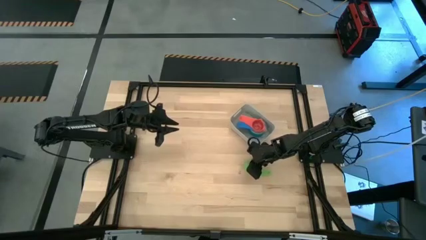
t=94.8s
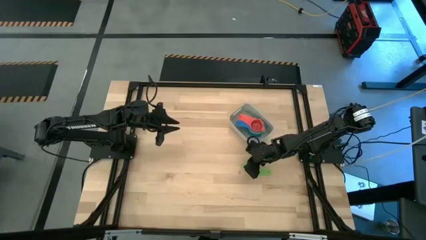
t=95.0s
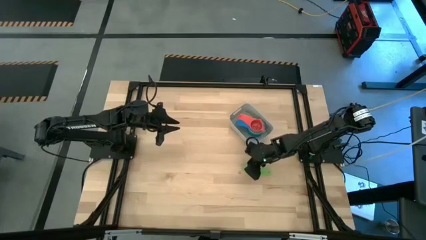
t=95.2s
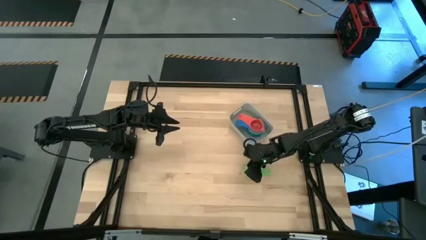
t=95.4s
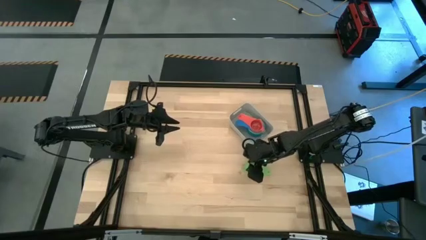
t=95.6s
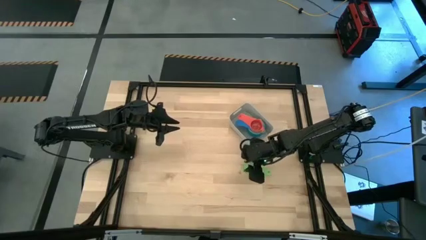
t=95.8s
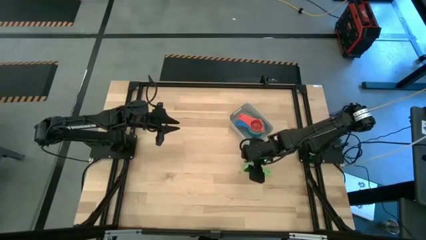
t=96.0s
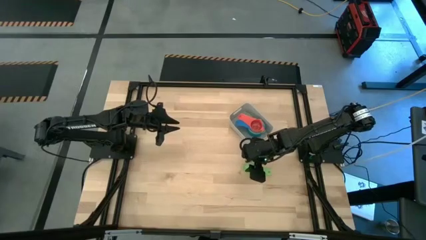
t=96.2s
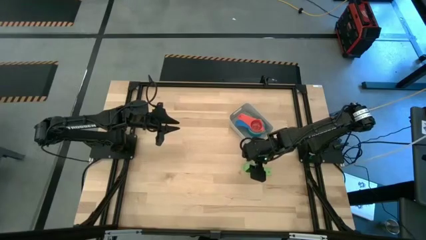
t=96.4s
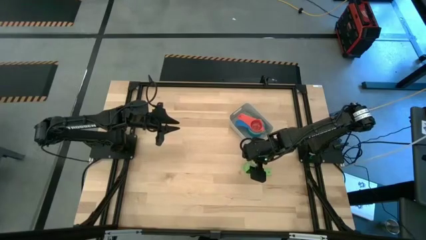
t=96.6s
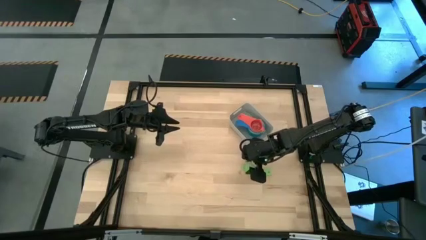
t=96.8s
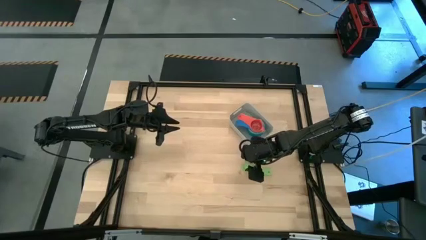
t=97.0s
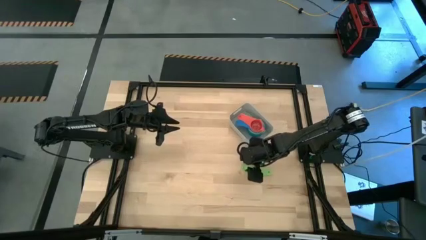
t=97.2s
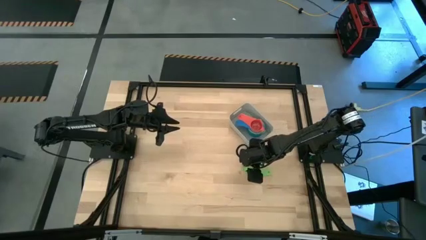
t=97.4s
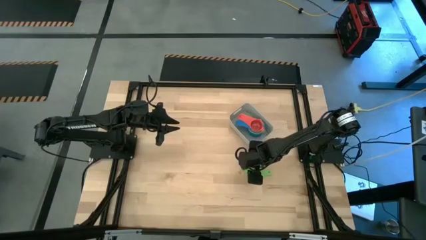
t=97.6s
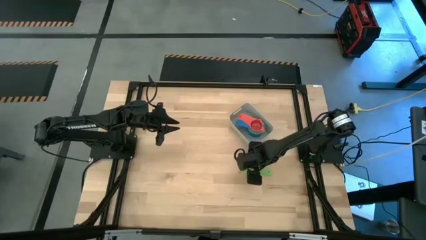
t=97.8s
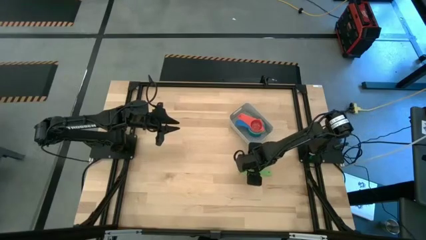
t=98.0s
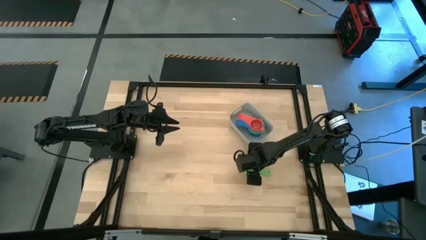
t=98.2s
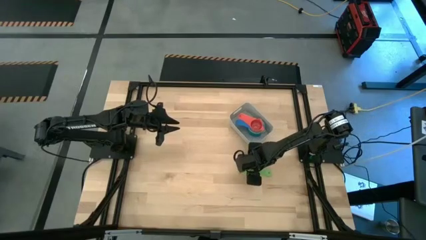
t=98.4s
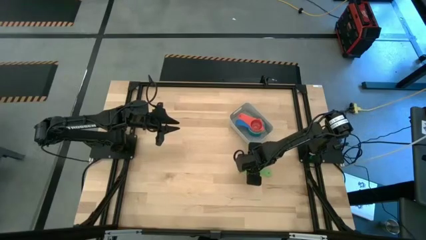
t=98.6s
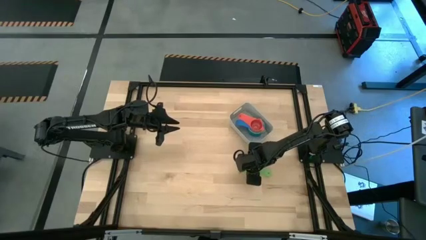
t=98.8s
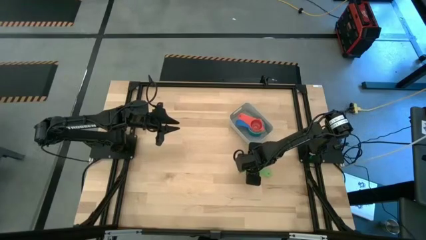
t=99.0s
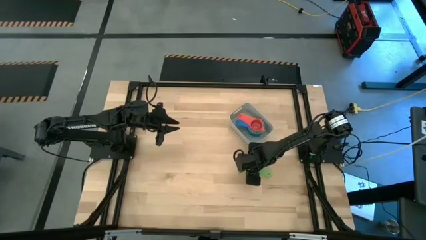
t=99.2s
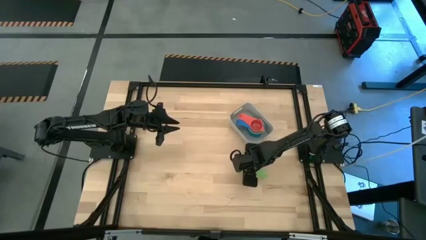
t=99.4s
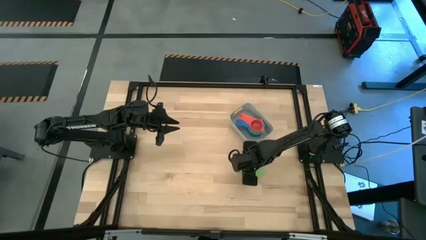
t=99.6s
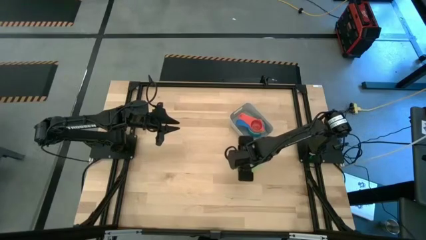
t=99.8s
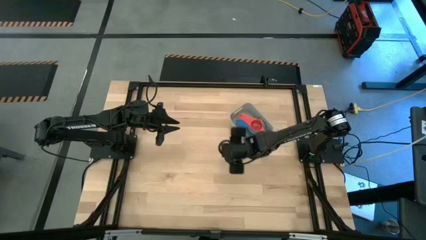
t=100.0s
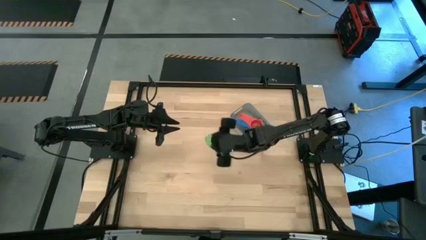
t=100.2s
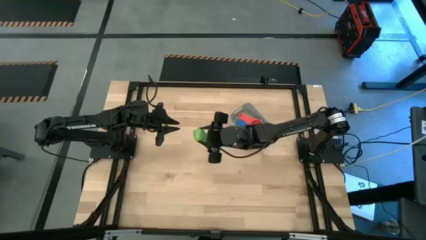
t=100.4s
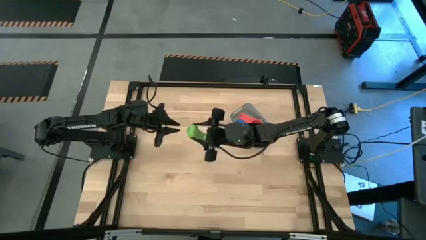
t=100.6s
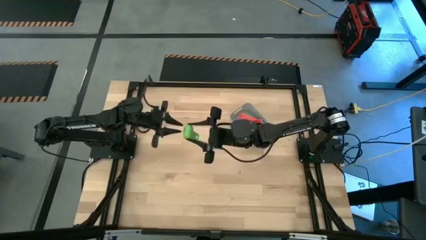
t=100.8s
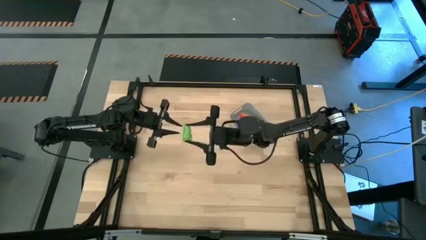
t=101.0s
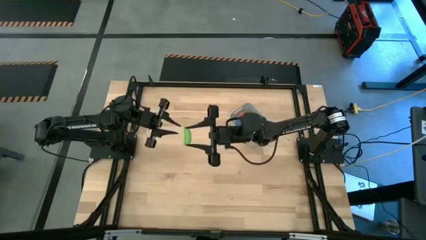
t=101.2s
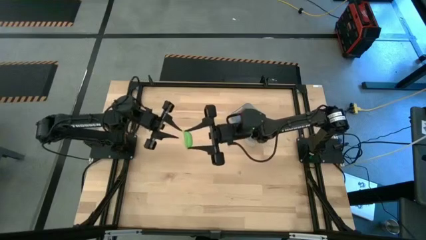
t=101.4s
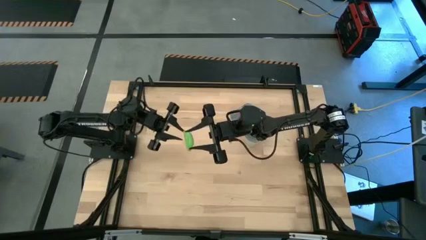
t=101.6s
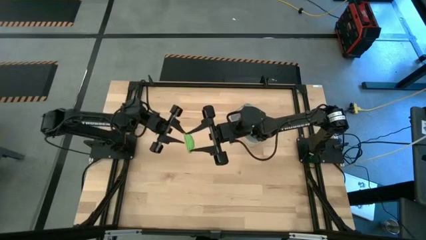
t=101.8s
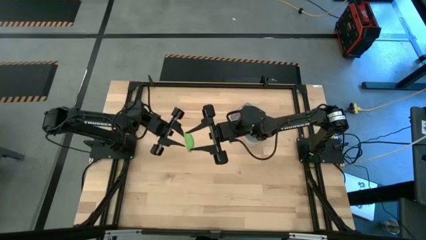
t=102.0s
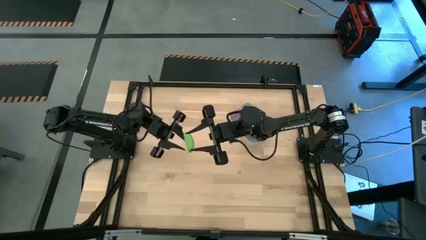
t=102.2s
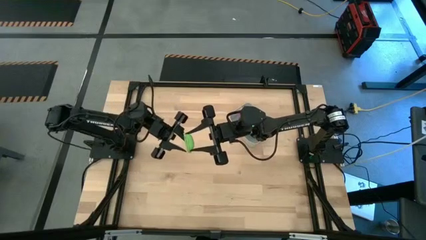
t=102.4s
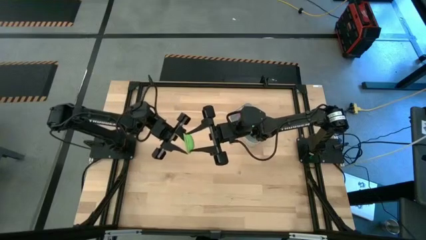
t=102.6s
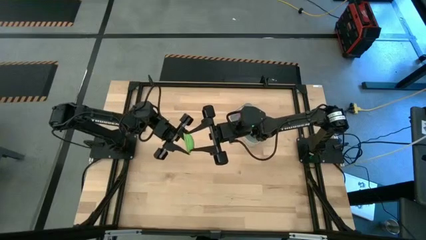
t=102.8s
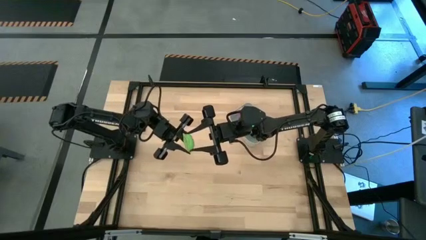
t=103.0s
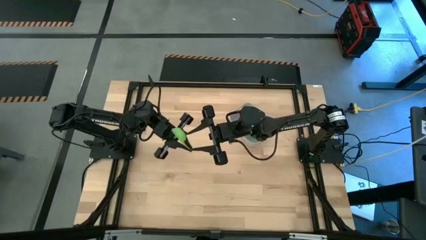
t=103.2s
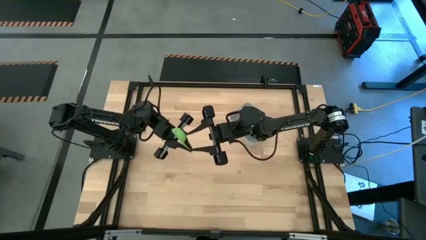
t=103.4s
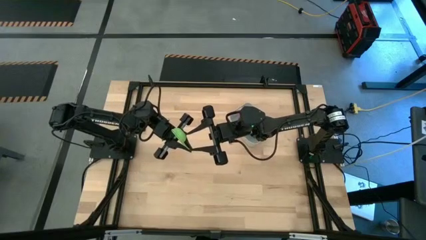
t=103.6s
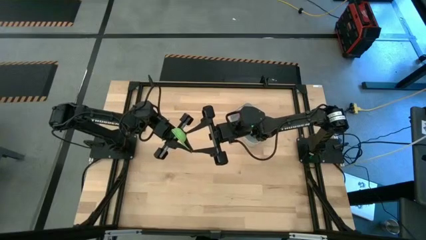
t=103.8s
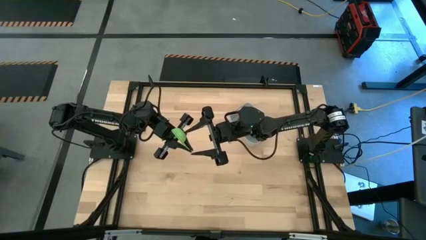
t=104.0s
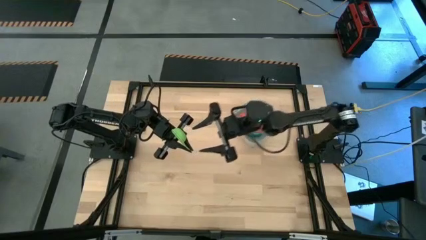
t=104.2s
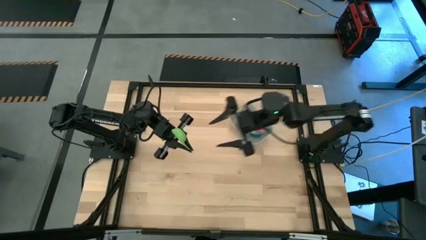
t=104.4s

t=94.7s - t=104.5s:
Task: Nest measuring cups in basket
Stack the green measuring cup on top of the red measuring cup in the bin

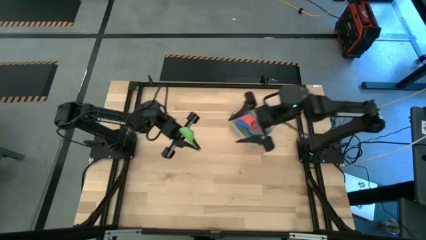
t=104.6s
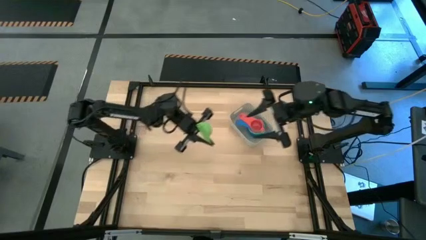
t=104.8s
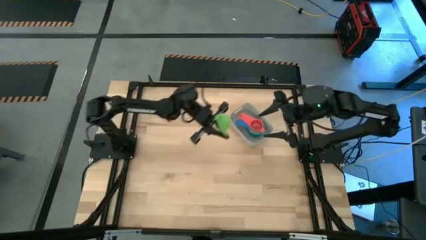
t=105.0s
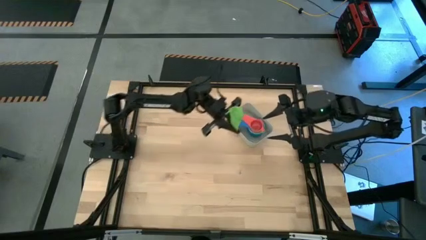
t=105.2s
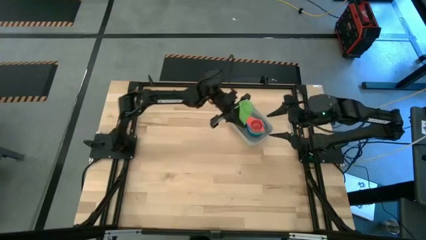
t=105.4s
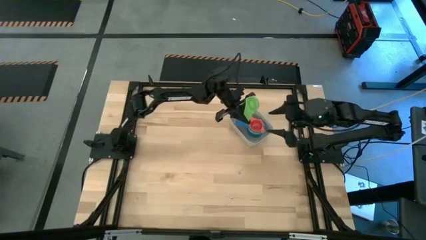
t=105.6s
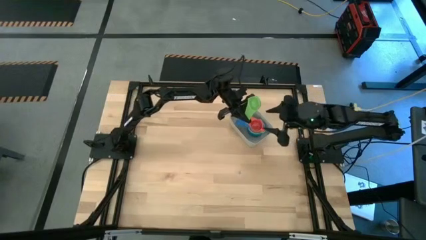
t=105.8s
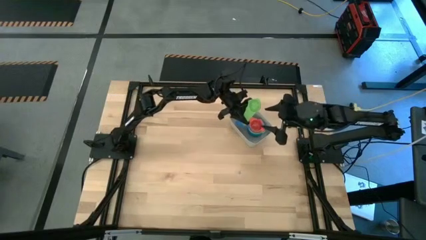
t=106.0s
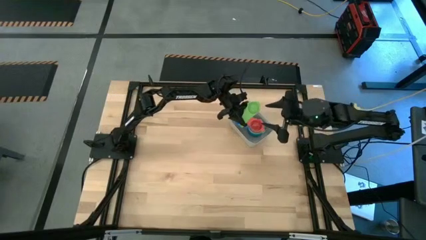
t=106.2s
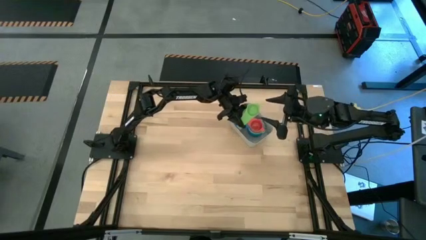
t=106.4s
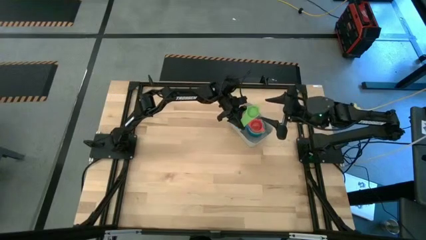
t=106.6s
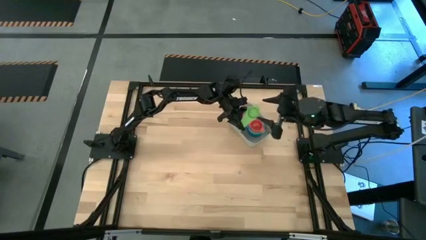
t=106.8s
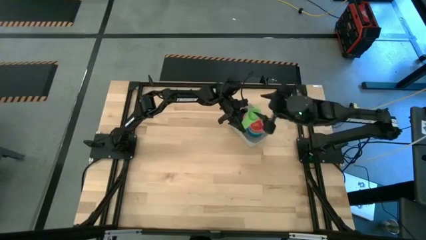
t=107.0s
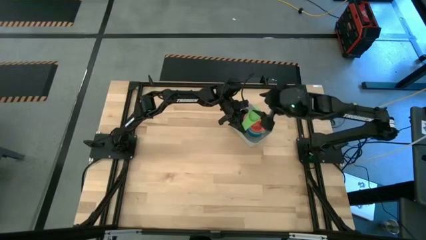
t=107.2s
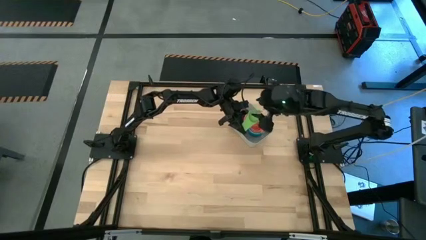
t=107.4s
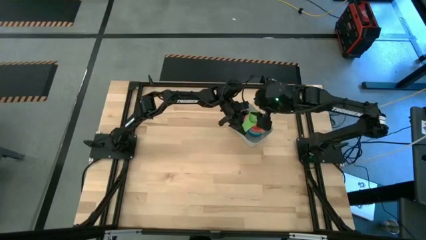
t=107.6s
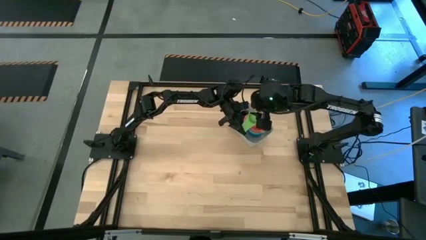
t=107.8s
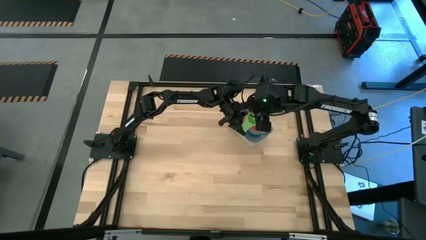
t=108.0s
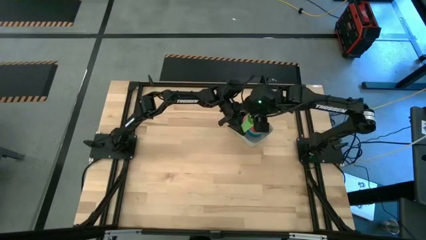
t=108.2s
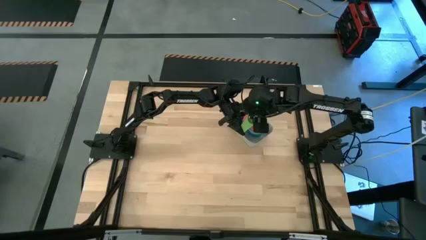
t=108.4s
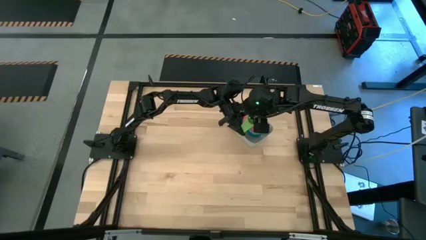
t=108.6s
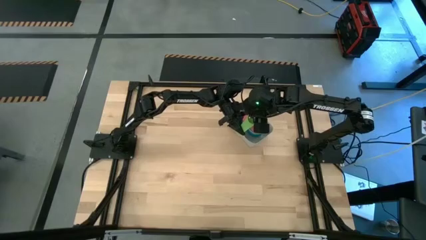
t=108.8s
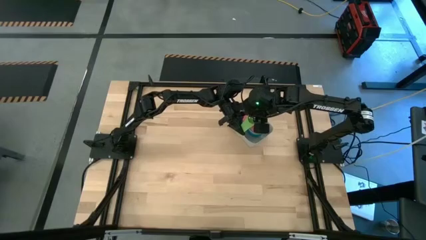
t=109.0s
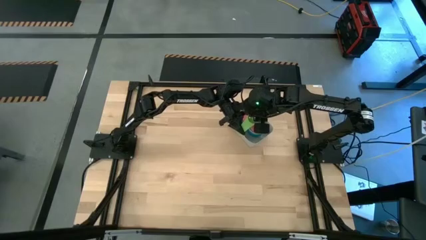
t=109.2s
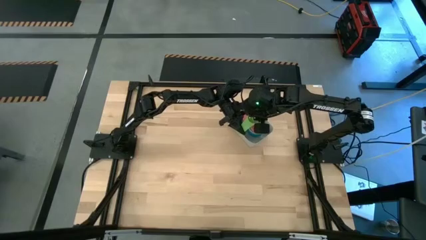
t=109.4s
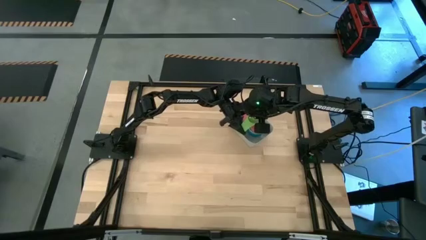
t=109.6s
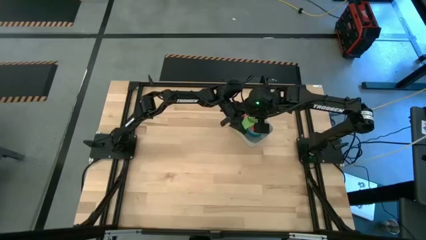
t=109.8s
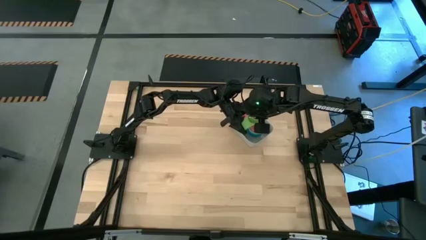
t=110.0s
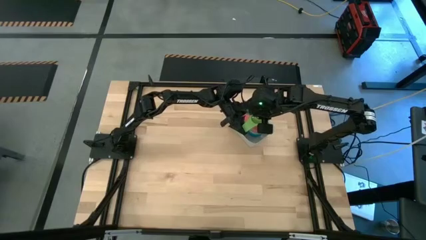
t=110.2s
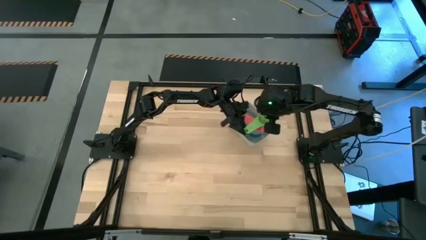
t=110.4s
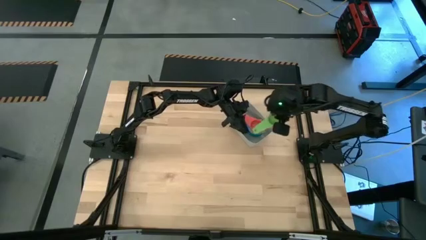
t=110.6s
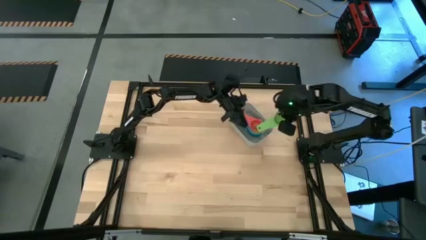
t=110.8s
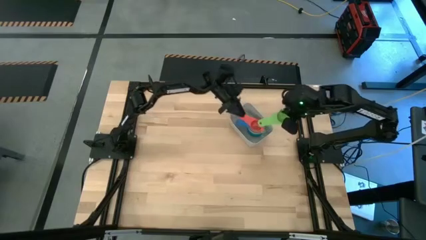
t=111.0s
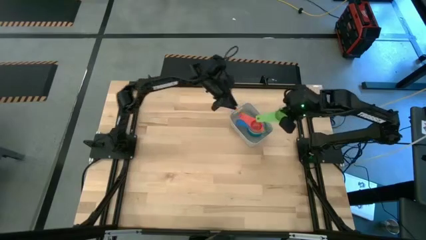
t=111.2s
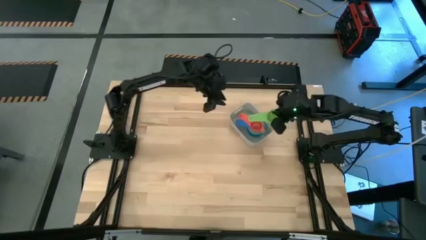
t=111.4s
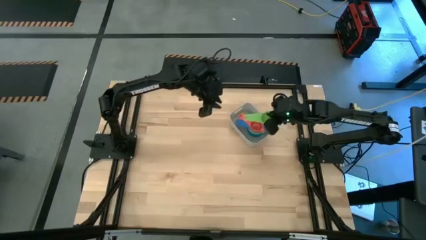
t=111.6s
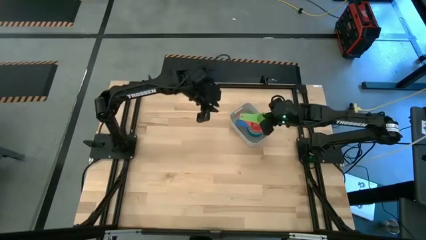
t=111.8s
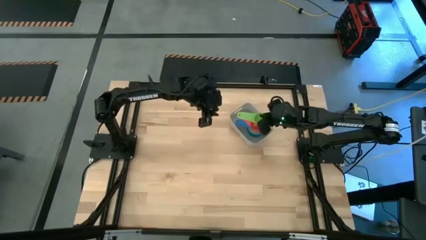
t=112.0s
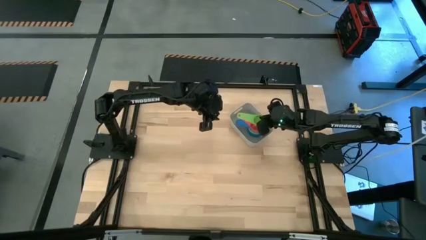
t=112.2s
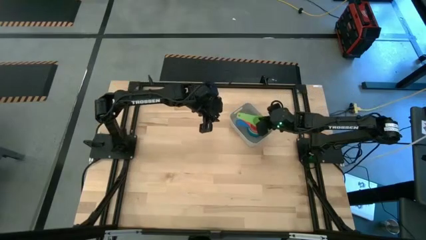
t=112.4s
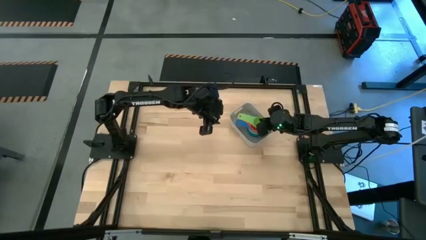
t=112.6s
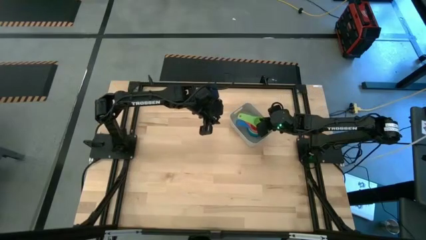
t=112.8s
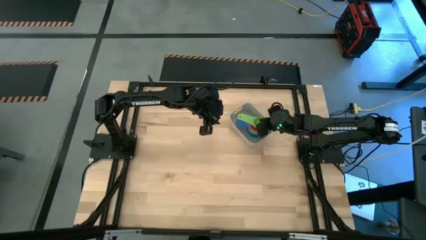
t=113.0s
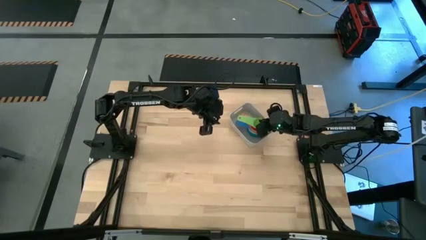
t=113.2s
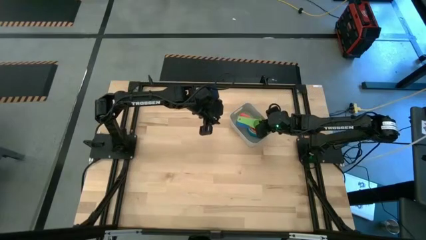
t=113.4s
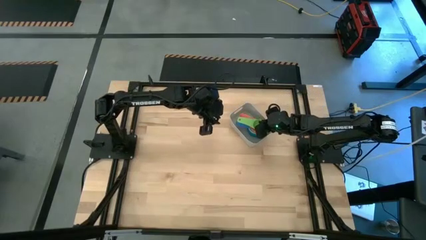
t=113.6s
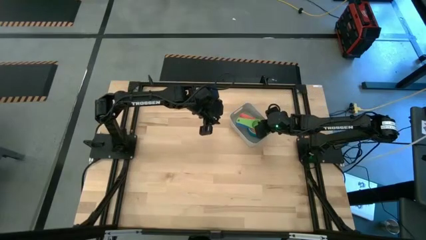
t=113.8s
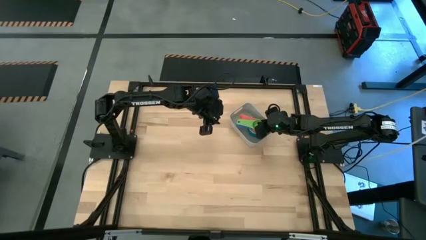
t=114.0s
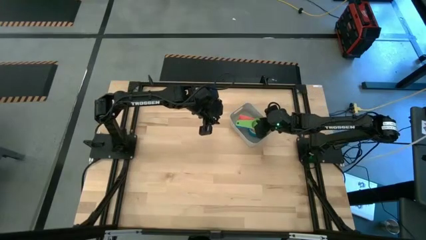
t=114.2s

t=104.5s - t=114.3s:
Stack the green measuring cup on top of the red measuring cup in the bin
